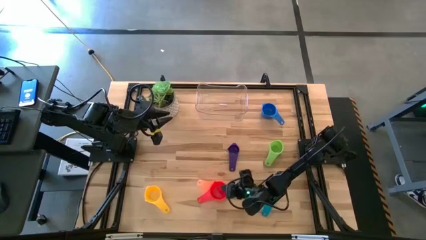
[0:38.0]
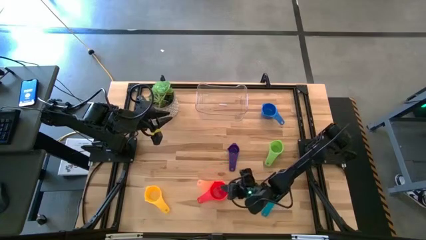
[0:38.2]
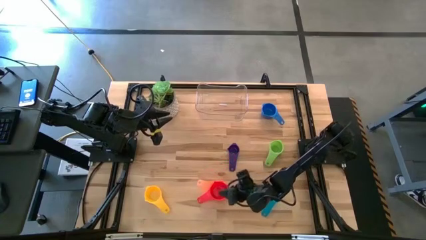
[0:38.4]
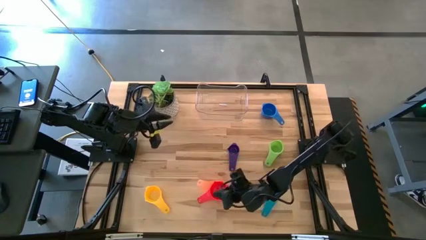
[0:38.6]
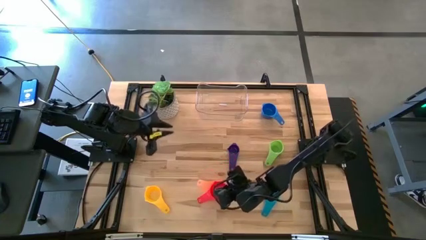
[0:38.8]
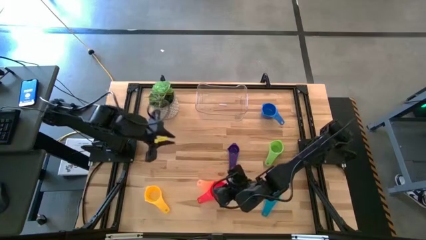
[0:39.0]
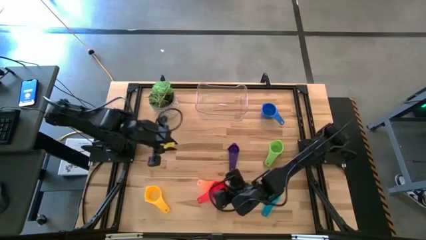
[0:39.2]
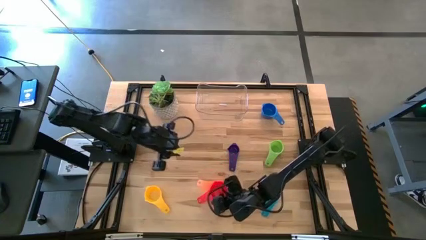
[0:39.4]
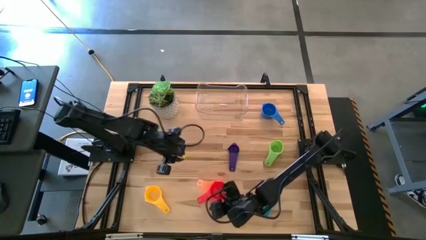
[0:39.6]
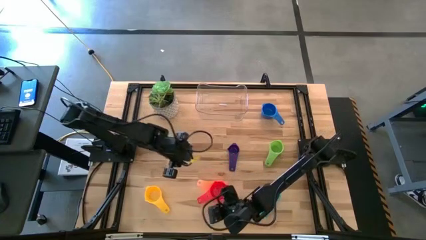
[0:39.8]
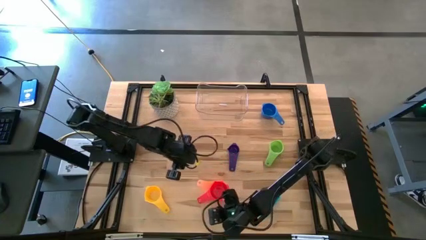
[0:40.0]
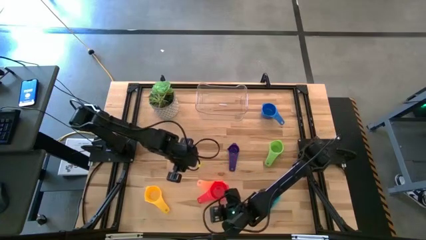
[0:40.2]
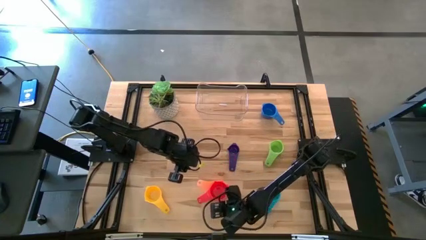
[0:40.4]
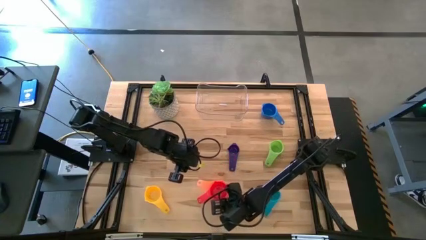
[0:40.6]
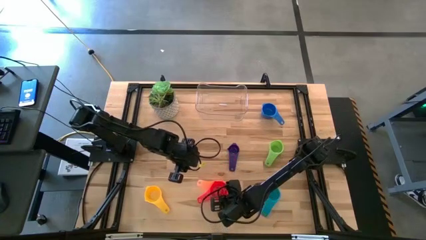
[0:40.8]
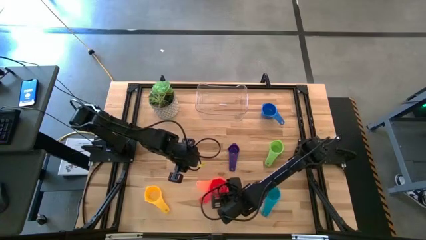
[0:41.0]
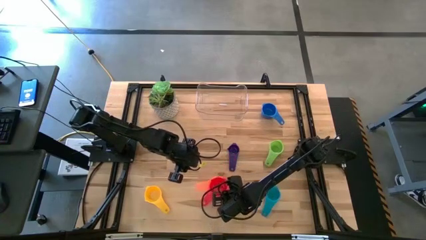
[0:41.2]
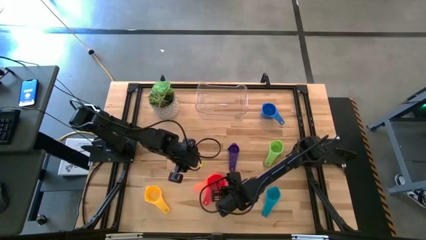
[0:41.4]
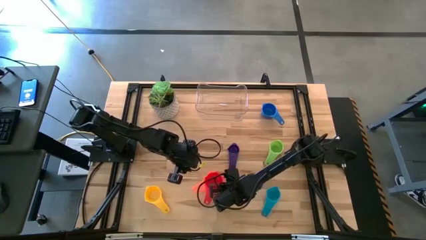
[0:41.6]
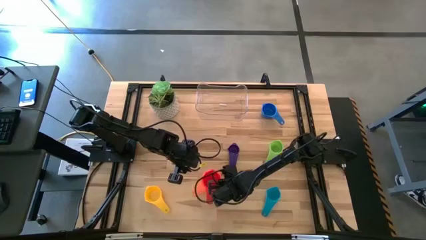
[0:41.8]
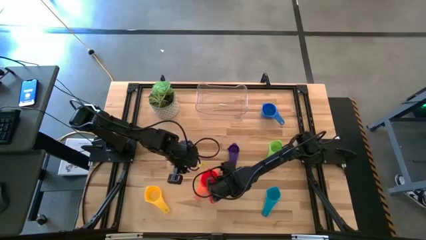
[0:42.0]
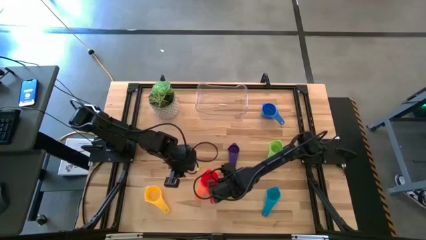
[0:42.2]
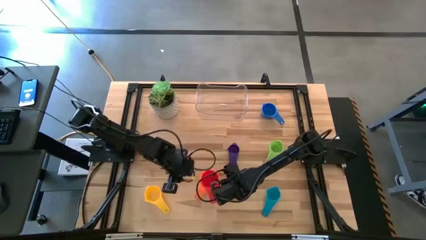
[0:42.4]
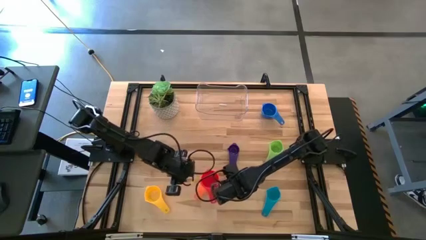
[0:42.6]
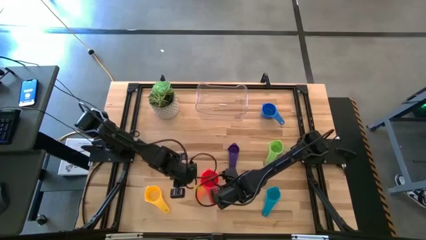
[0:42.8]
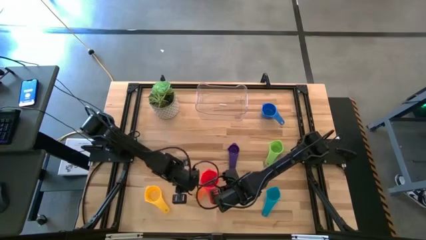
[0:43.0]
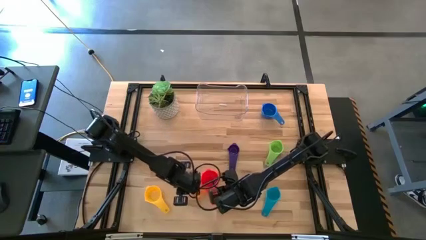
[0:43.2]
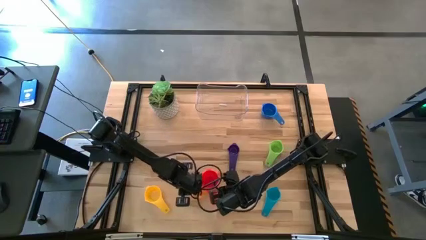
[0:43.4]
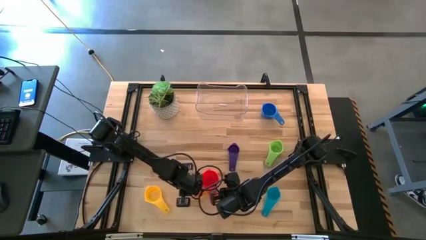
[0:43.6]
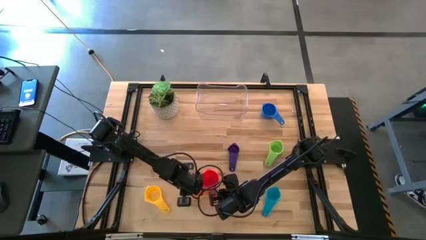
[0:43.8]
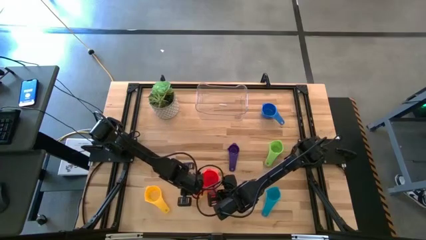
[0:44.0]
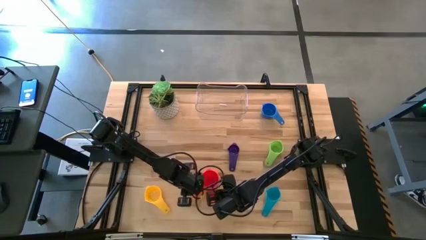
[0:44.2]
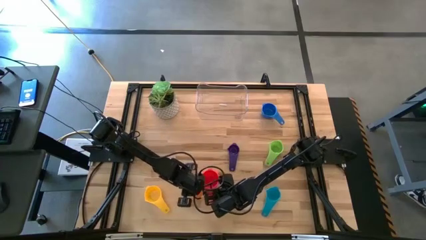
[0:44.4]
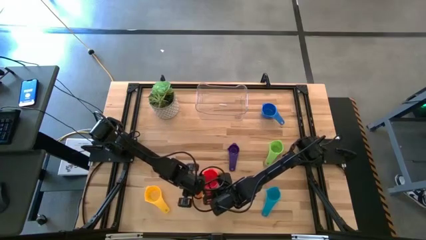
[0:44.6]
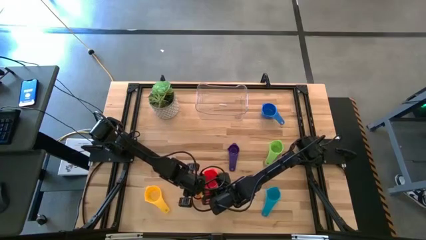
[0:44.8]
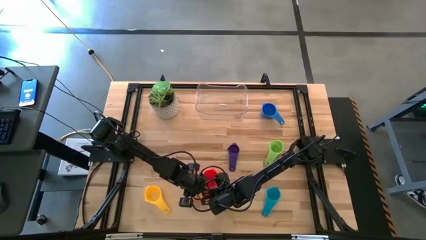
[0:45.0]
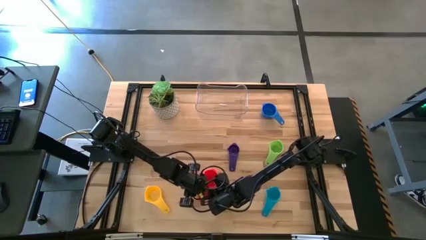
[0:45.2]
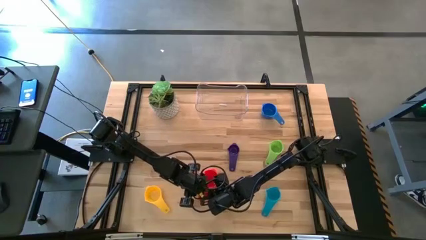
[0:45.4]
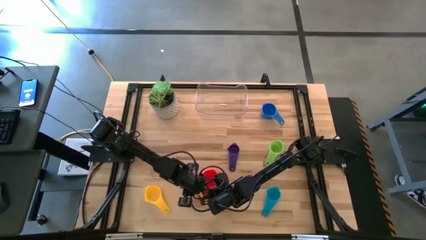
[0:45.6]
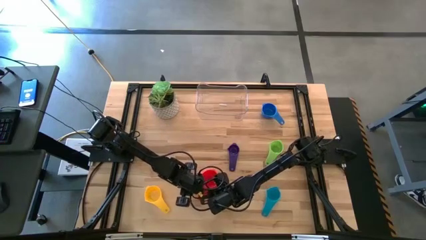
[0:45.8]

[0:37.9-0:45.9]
Task: Nest measuring cups in basket
Adjust the stacked measuring cups

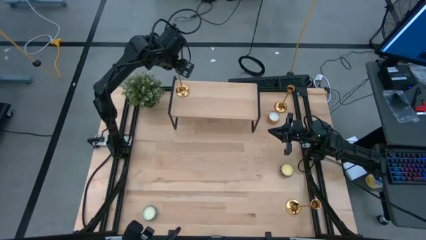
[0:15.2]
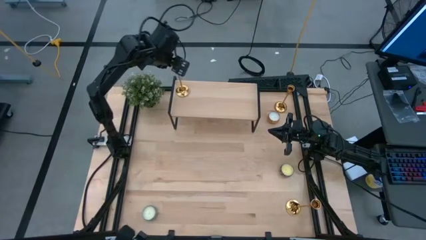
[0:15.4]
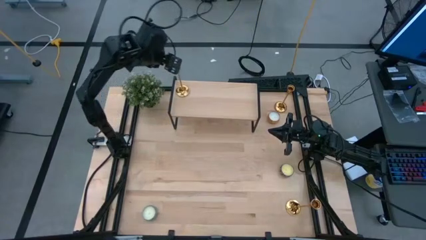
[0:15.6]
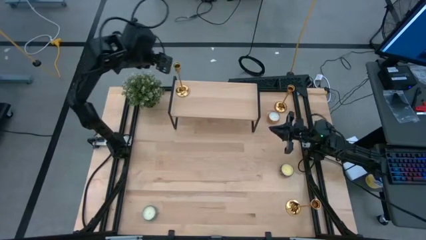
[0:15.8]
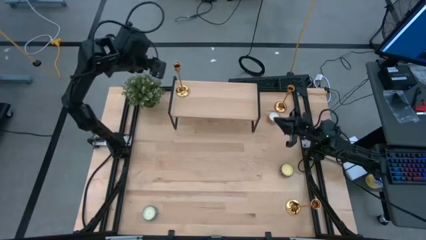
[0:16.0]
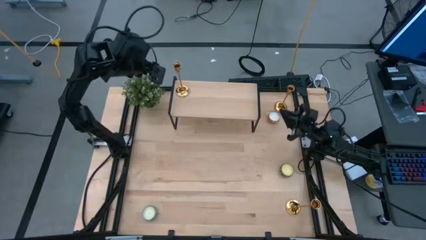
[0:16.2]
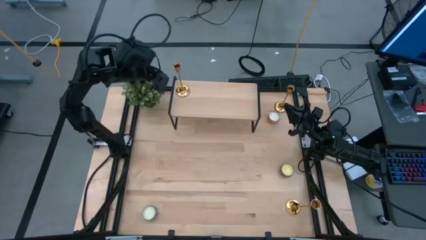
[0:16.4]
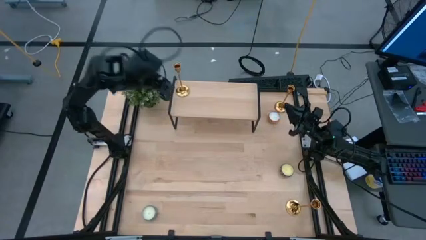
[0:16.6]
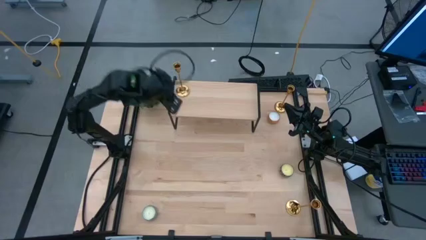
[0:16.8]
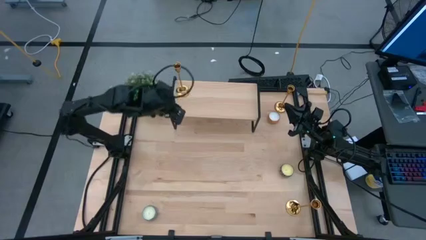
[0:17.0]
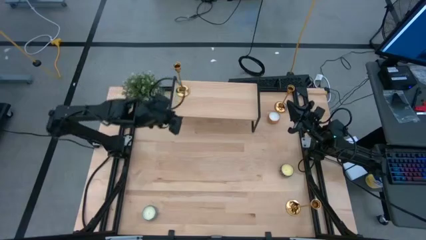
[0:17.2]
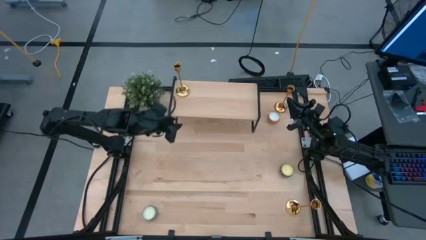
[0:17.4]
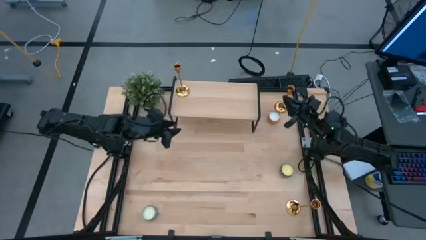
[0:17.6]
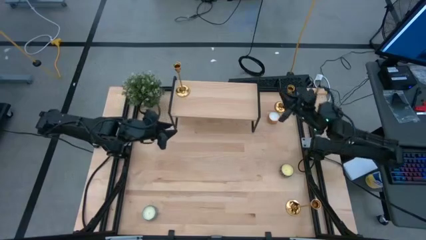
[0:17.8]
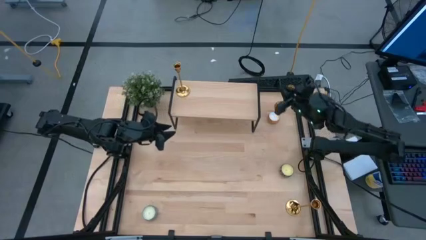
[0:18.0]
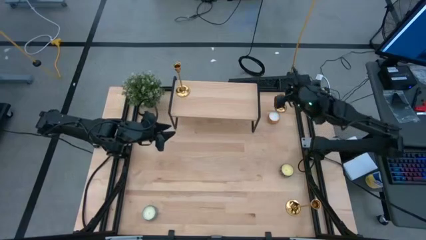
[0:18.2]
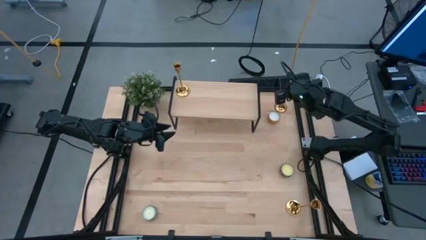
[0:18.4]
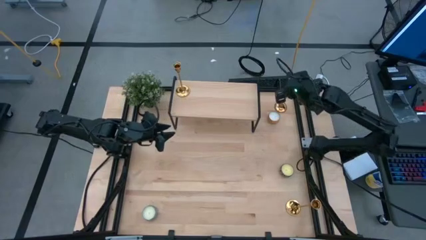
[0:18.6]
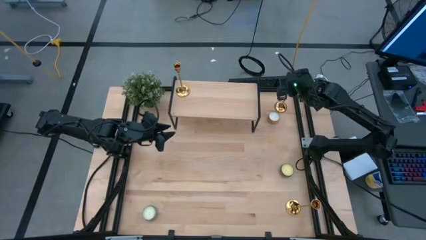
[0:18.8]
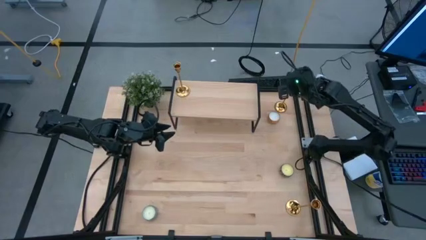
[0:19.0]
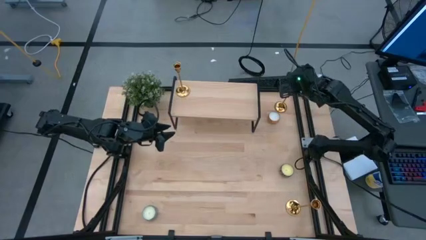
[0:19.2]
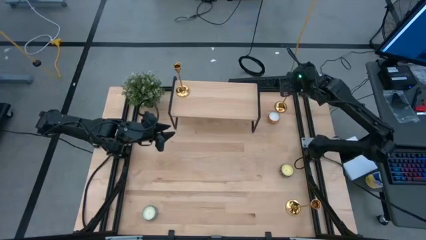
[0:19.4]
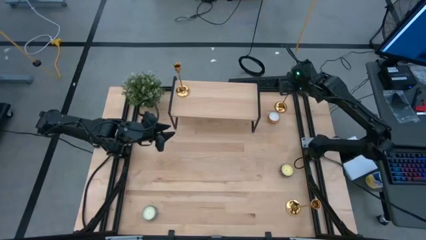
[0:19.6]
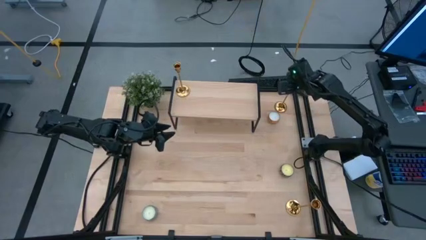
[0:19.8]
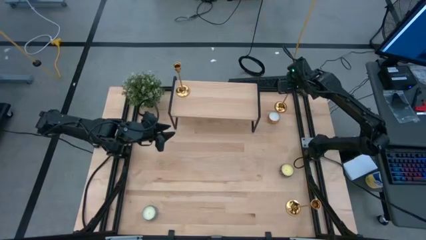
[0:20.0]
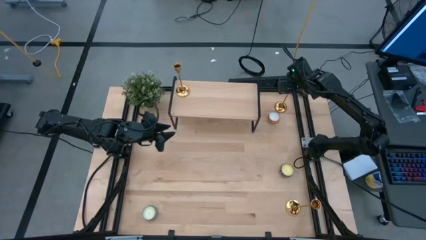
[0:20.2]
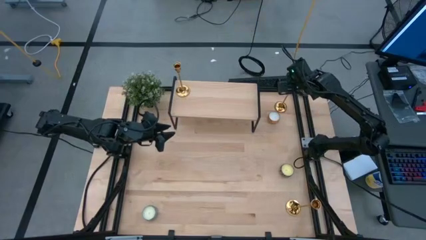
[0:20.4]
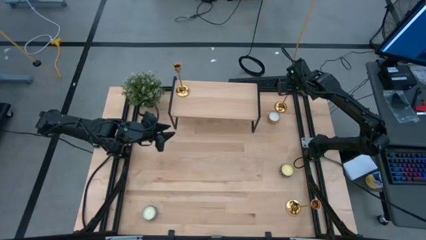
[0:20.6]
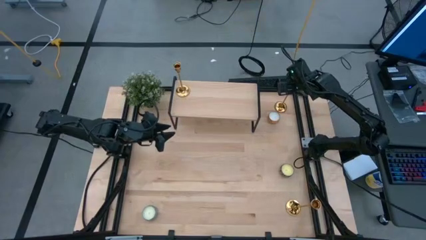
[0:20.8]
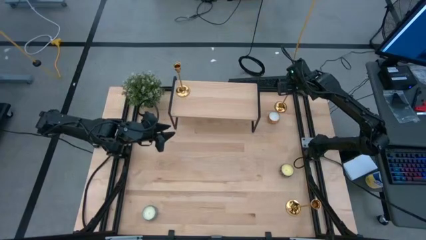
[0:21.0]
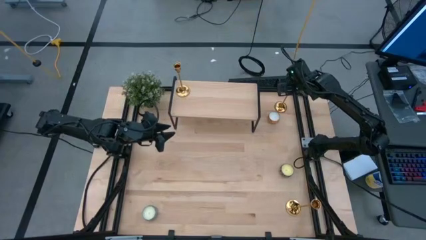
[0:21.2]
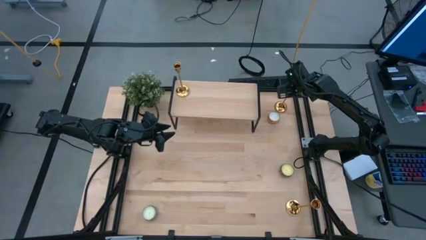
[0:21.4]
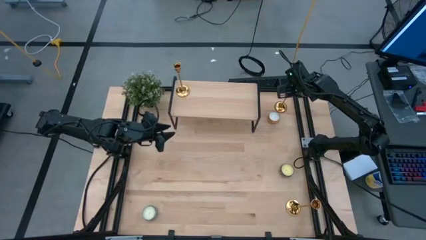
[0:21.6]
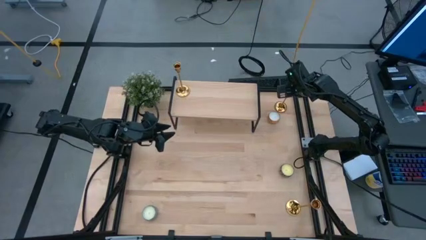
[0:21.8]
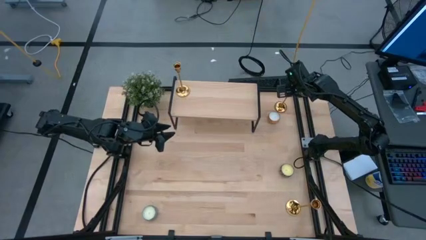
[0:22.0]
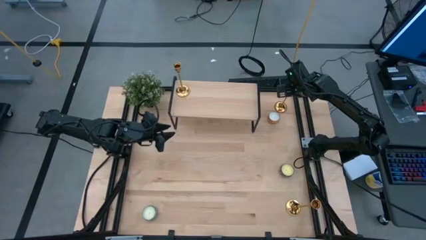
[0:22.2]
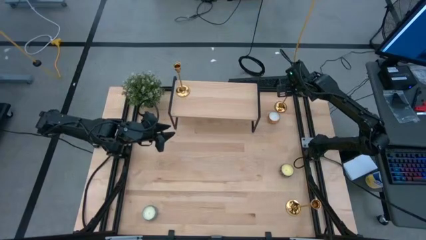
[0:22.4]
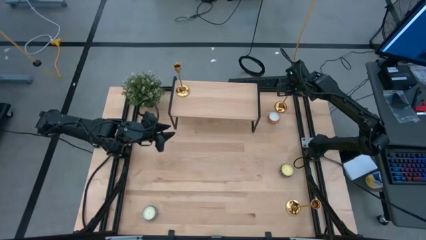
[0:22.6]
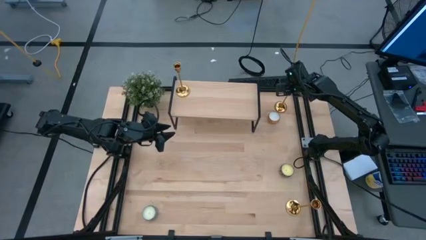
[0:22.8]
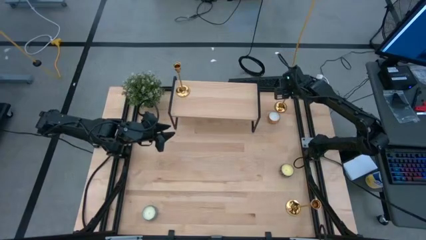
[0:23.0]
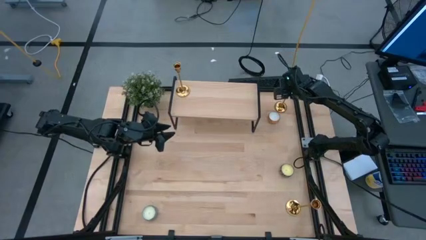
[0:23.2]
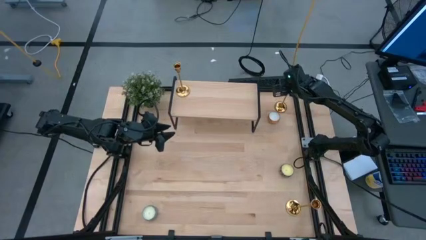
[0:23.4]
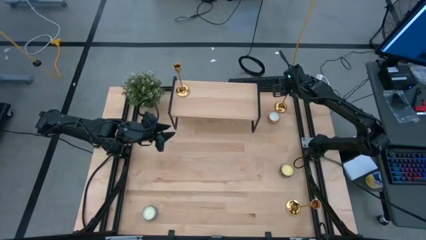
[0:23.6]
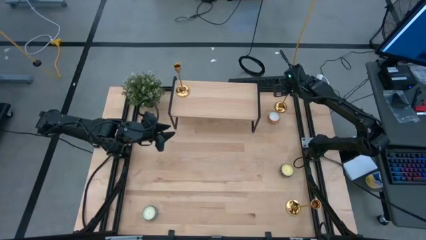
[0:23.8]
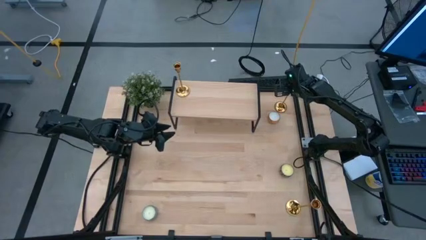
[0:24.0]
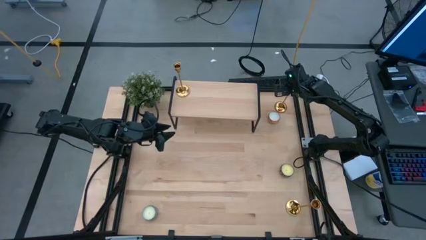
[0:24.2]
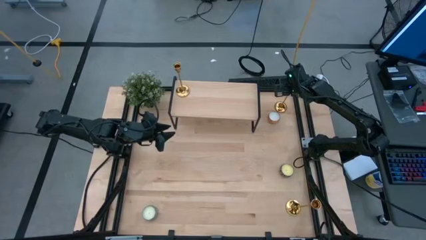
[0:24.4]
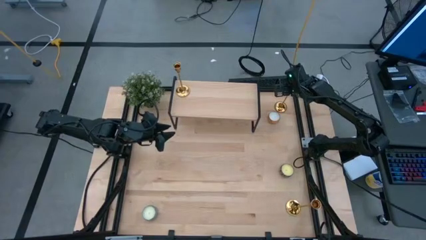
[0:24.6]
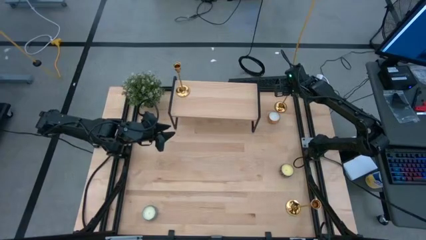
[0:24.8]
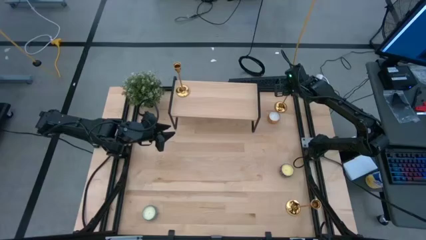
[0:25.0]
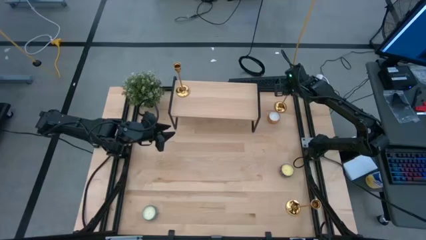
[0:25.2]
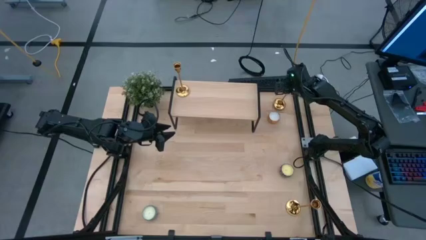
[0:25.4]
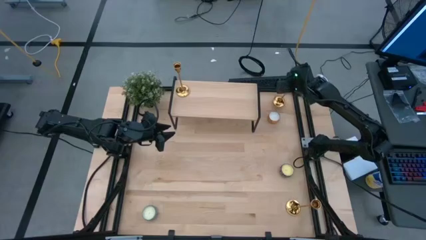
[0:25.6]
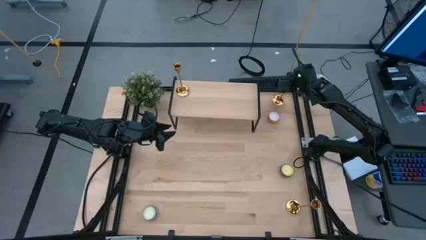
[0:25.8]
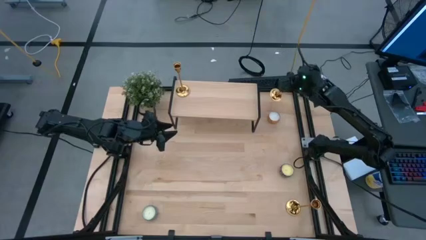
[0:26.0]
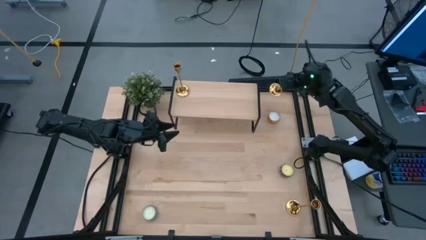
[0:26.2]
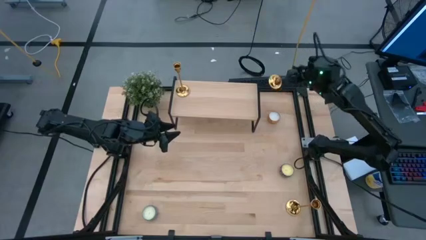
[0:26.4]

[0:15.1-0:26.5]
Task: Pick & Place candle stick holders
Put the top gold candle holder on the shelf
